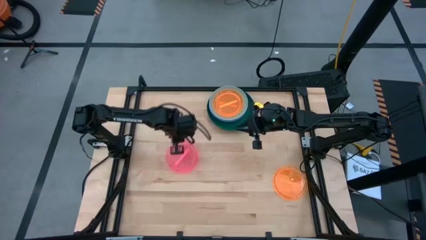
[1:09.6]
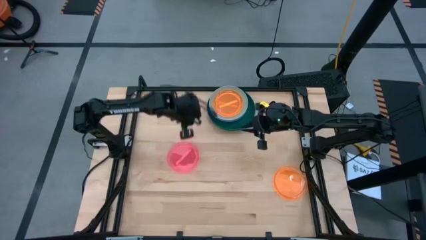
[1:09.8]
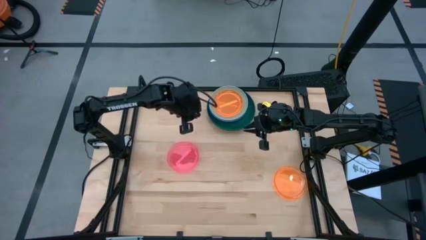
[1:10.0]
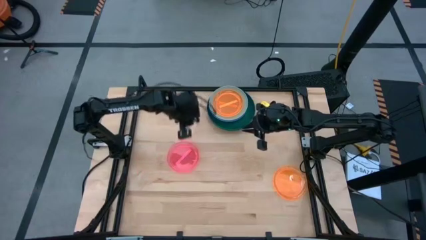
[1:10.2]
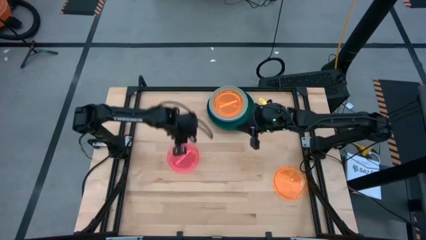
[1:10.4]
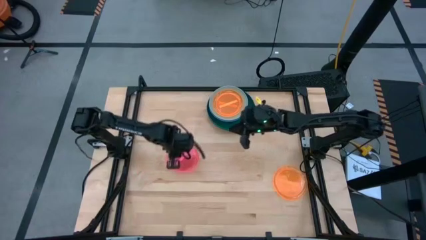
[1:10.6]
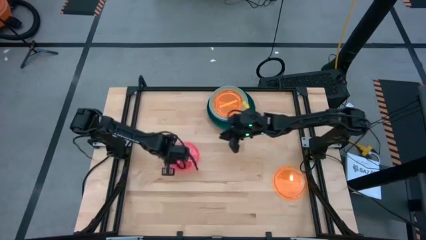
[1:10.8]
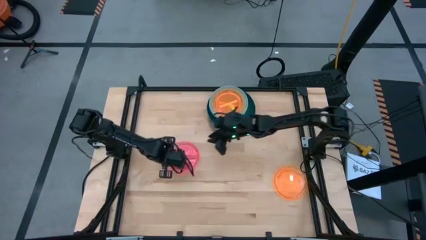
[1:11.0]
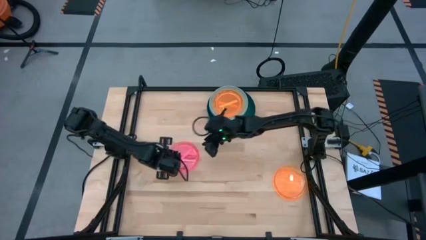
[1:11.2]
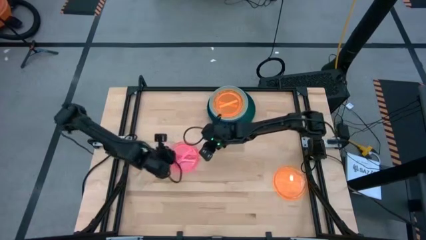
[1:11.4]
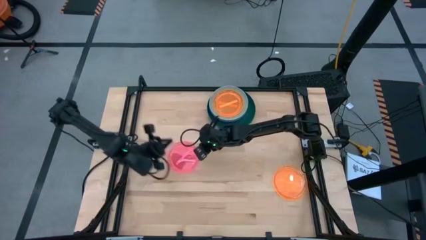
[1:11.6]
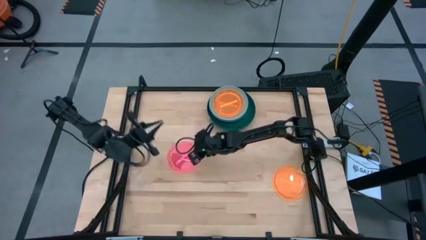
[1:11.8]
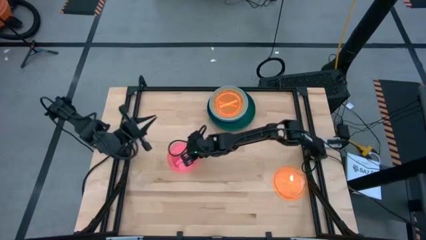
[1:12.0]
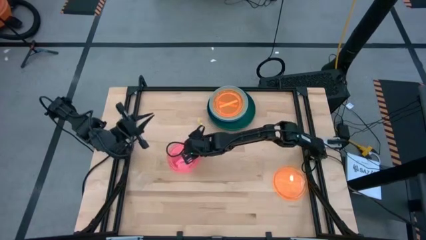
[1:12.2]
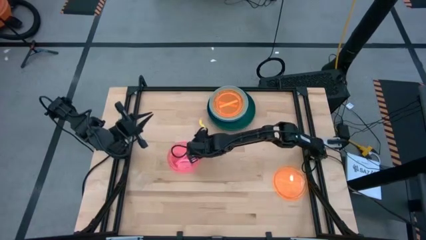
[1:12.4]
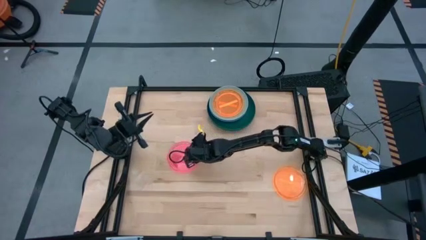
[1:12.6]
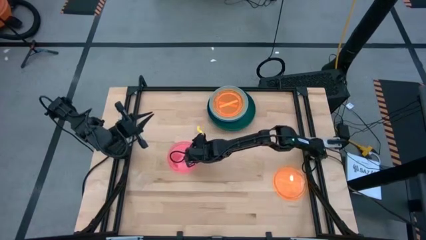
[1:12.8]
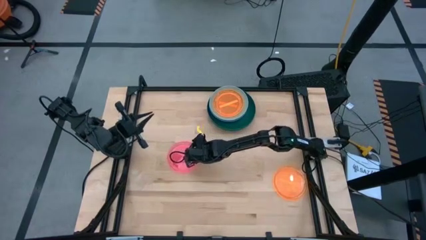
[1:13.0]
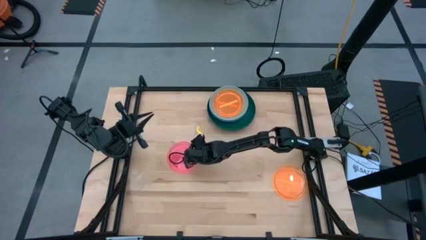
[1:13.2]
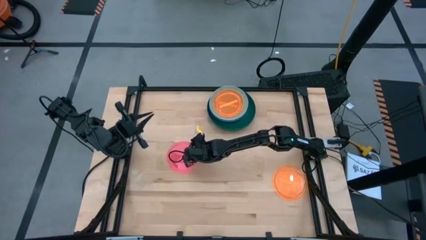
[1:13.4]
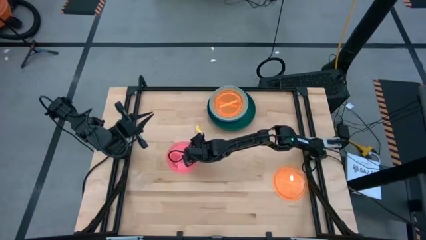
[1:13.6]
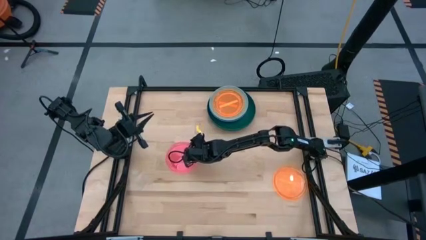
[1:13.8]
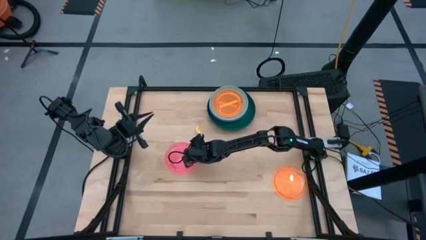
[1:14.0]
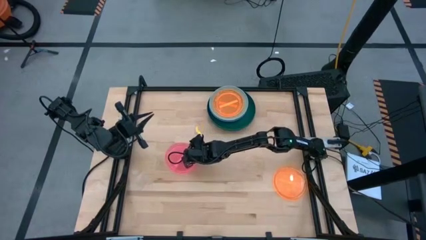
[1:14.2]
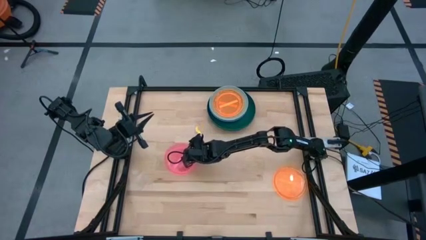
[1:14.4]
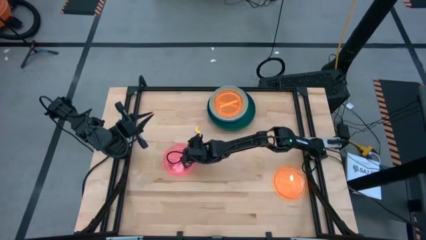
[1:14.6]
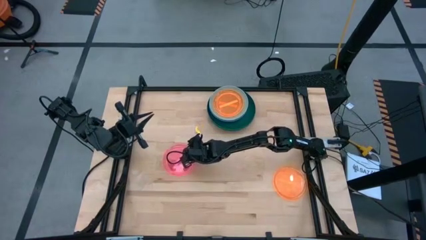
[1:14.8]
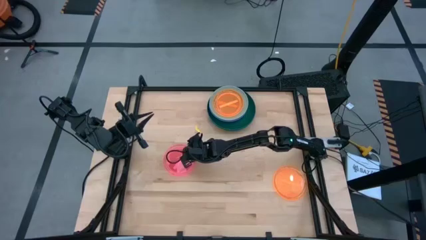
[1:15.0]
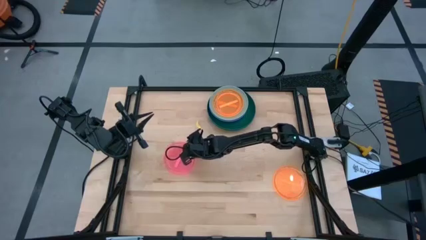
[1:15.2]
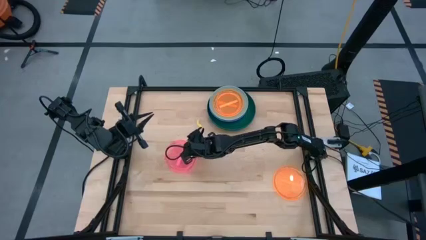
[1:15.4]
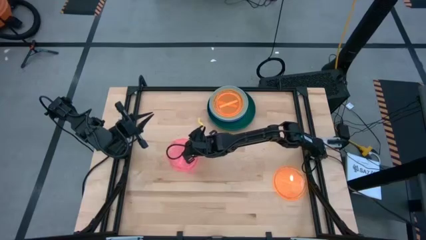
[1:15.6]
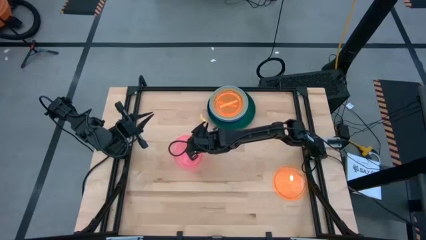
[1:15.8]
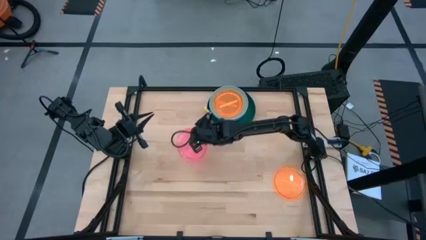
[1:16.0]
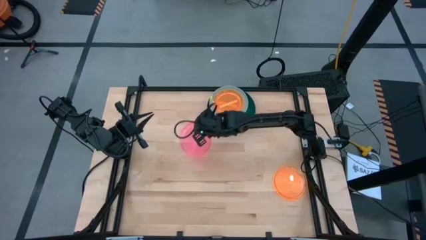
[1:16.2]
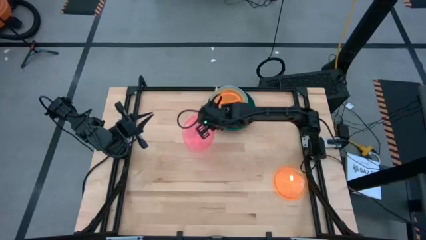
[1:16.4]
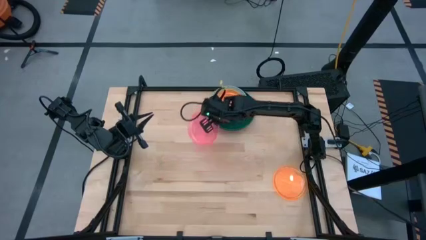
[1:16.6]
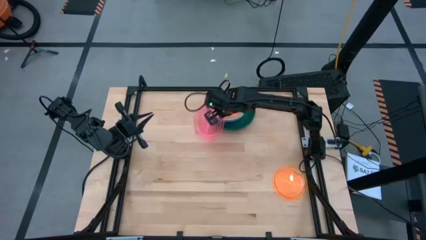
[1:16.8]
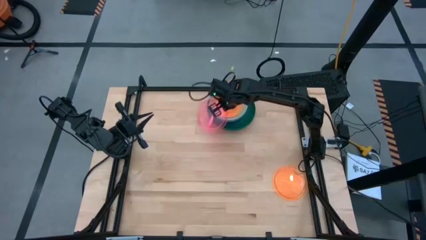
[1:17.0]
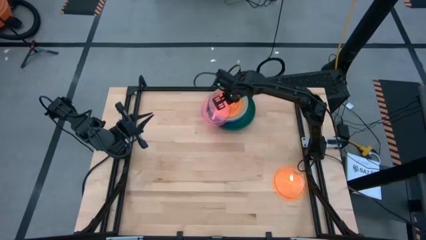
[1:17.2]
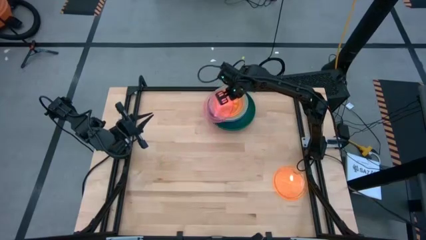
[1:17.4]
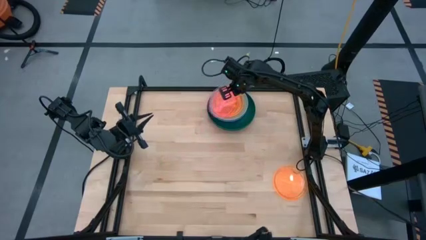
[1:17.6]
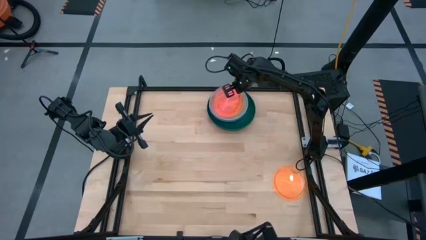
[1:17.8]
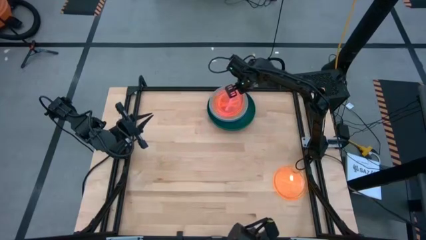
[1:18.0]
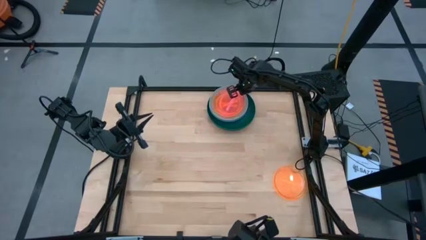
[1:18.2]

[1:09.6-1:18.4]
Task: Stack plastic plates
Stack the pink plate on the top orange plate

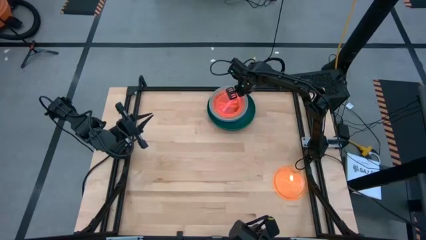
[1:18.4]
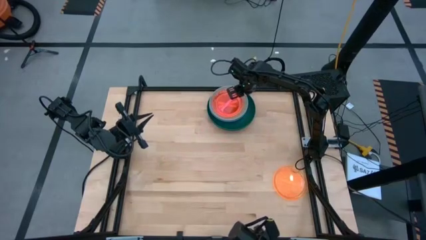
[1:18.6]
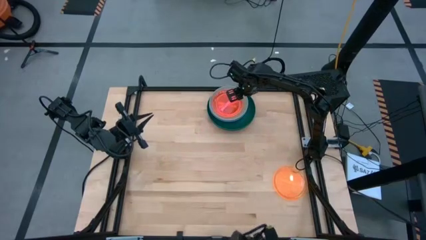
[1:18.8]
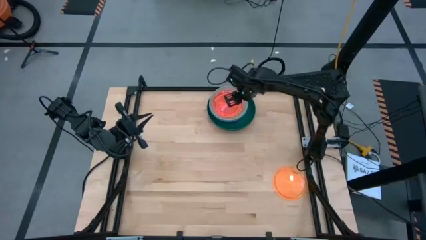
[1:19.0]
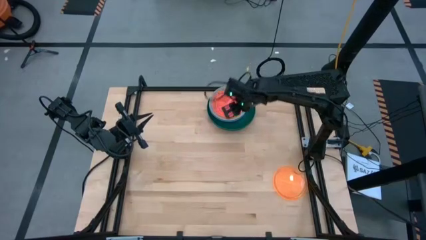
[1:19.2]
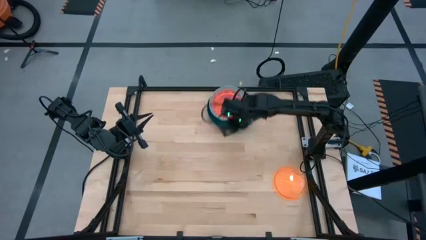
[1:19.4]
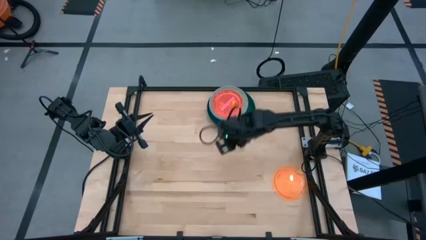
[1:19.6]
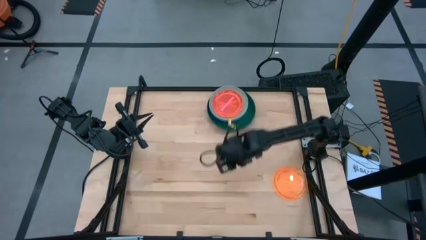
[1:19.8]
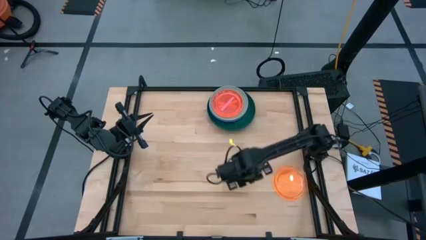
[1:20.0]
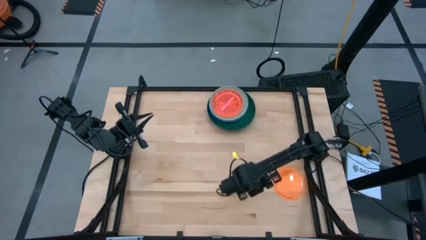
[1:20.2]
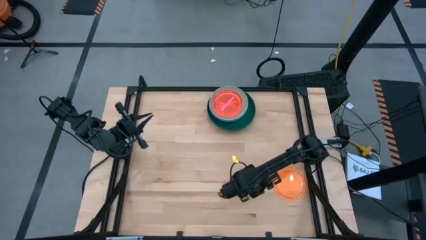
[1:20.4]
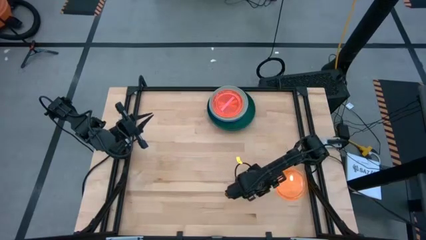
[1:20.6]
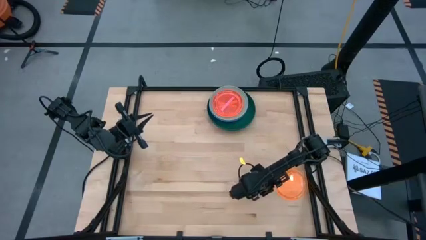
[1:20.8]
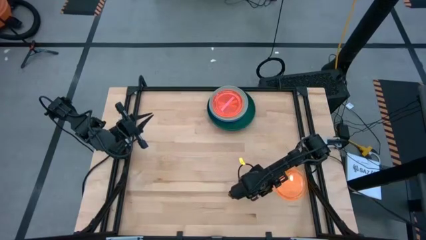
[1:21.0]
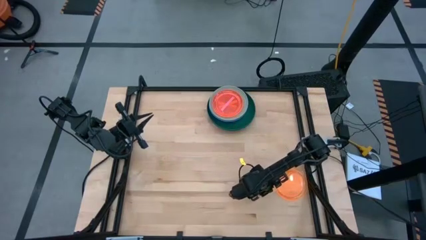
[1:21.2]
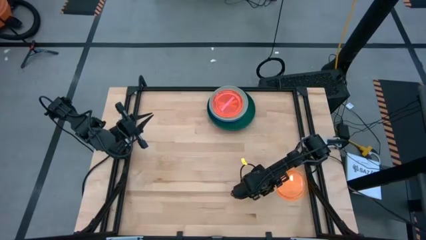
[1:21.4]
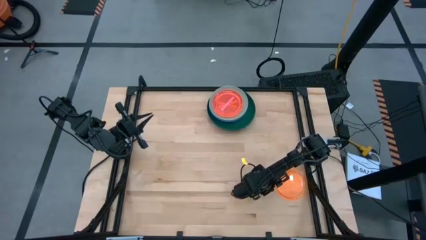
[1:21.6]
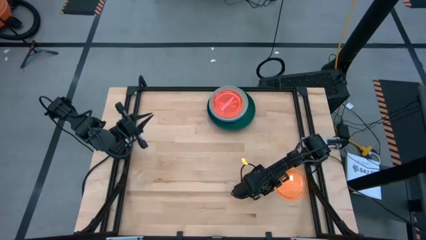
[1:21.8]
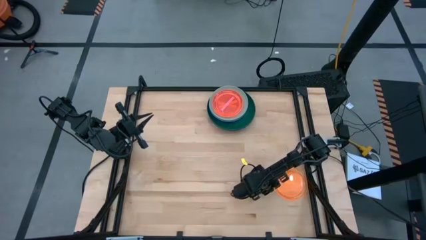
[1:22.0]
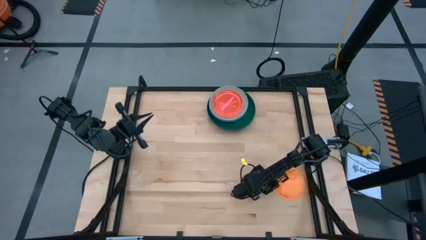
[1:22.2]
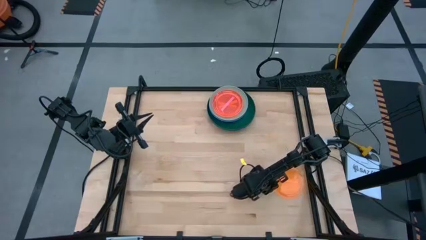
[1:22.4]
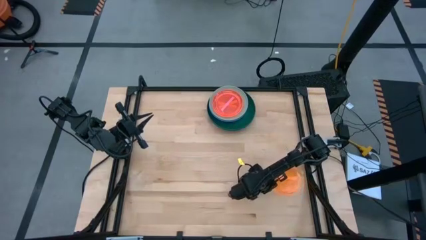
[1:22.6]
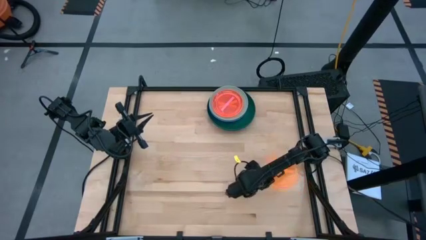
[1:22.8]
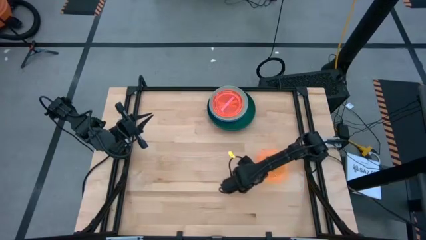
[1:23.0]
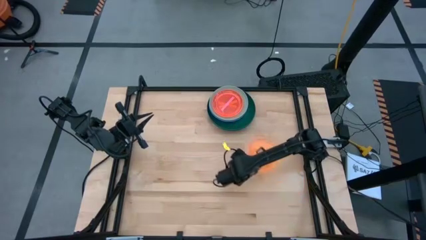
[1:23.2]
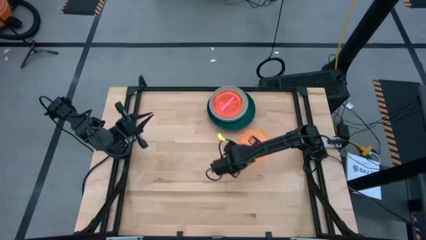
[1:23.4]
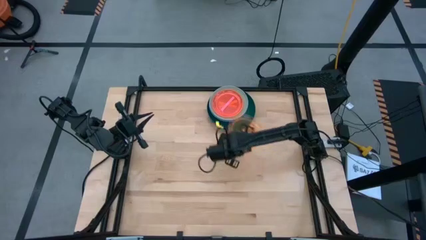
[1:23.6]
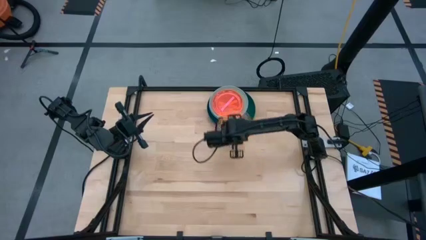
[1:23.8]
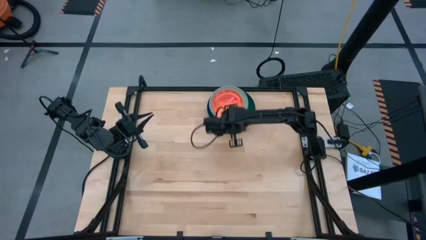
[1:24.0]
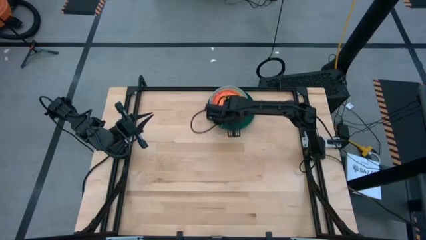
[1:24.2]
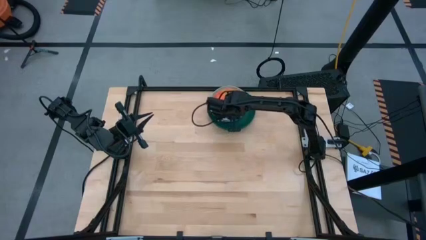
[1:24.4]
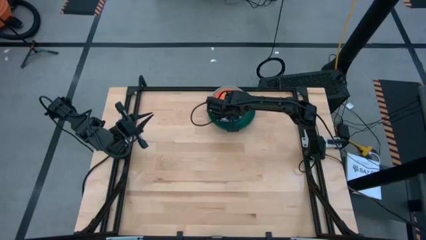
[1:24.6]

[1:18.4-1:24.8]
Stack the orange plate on the pink plate
